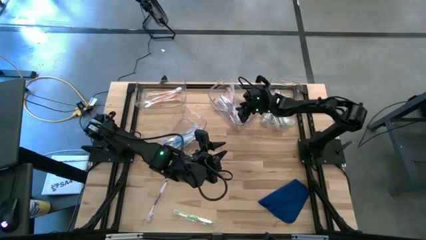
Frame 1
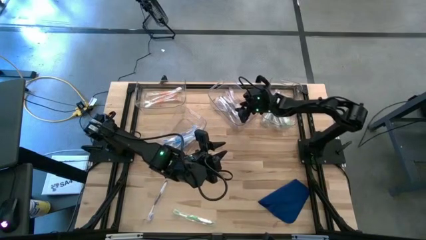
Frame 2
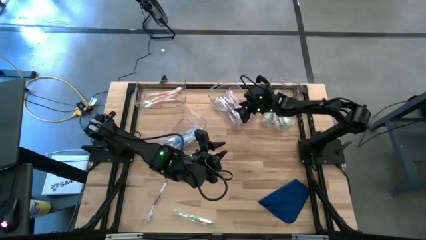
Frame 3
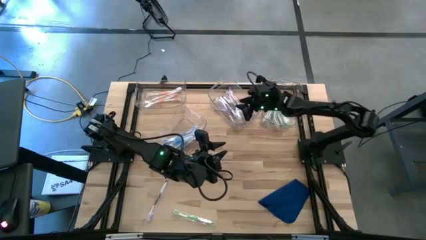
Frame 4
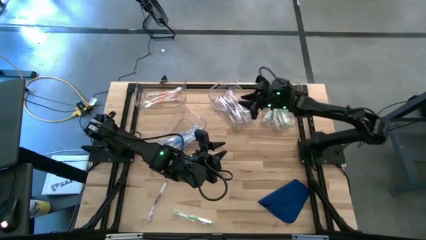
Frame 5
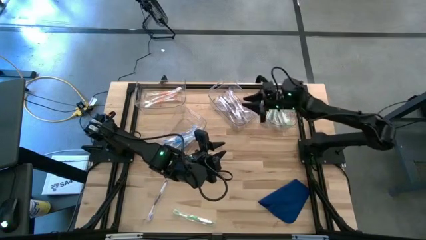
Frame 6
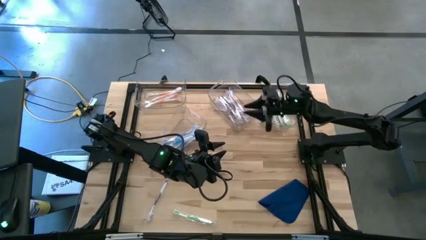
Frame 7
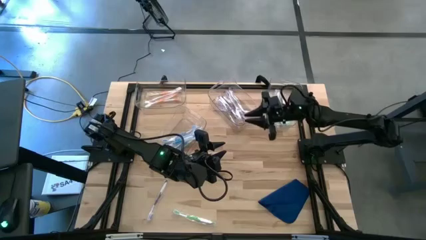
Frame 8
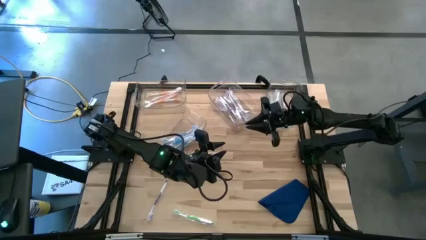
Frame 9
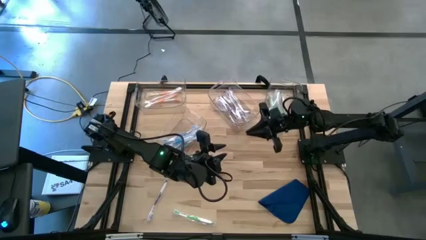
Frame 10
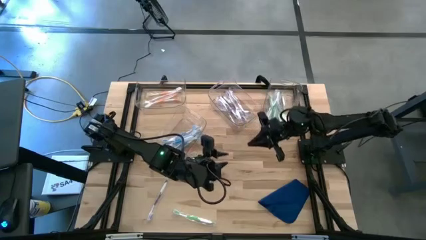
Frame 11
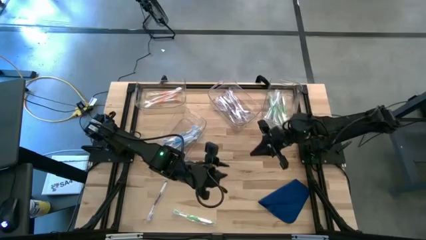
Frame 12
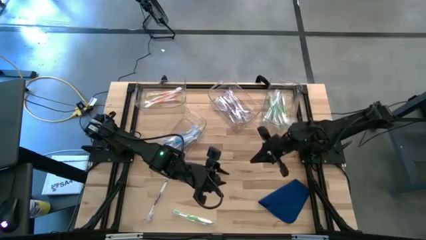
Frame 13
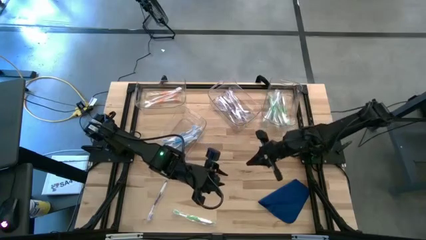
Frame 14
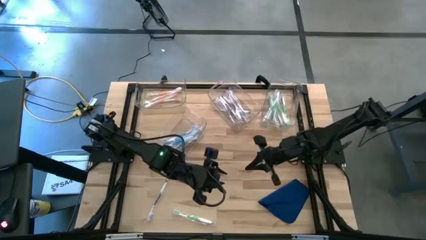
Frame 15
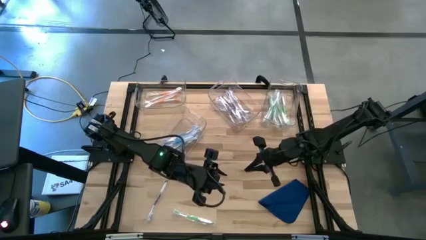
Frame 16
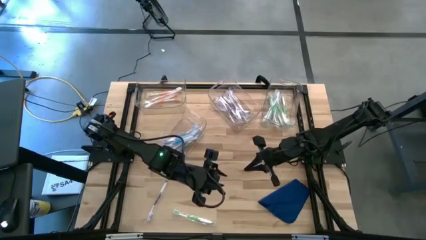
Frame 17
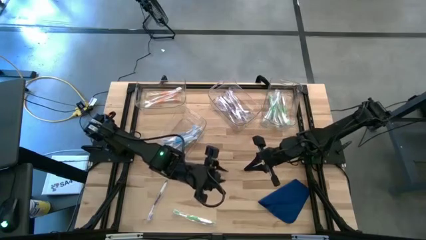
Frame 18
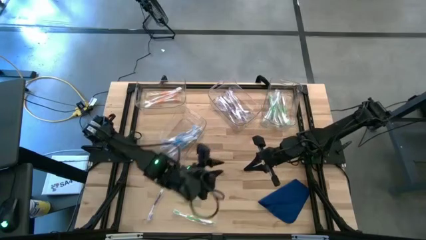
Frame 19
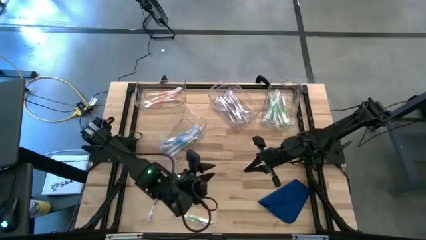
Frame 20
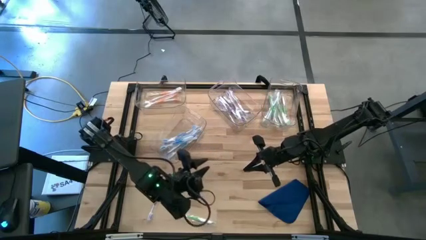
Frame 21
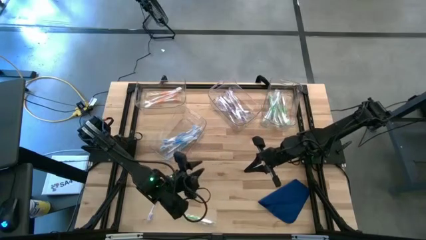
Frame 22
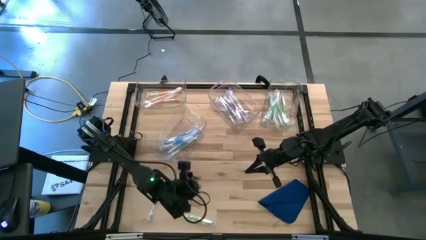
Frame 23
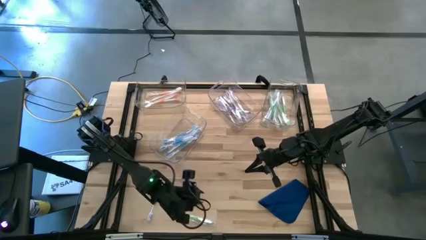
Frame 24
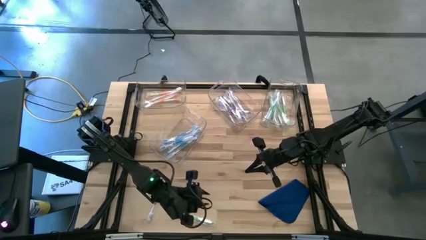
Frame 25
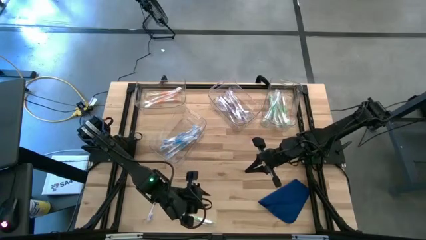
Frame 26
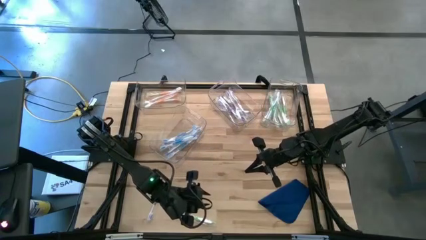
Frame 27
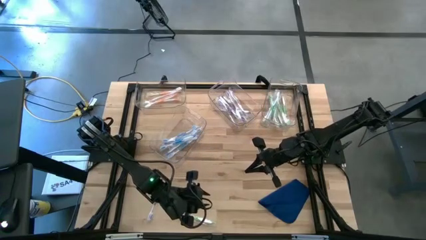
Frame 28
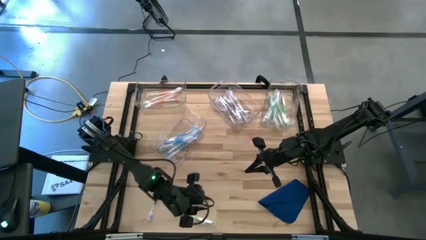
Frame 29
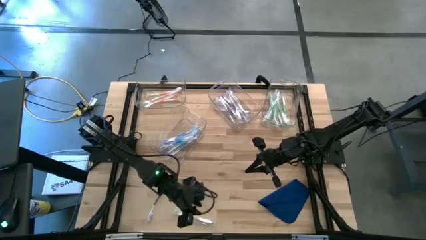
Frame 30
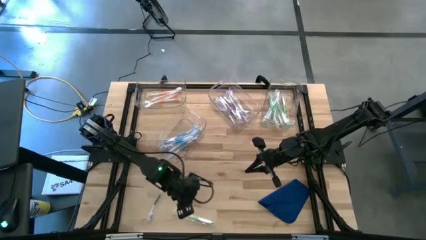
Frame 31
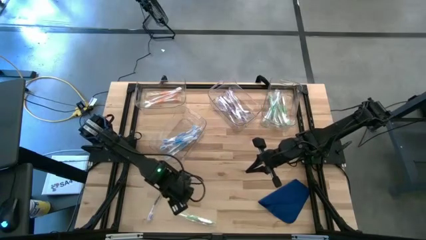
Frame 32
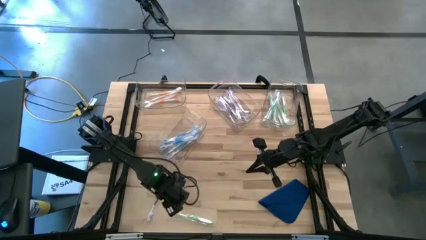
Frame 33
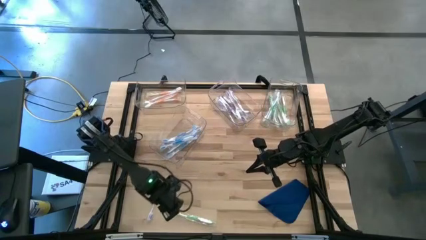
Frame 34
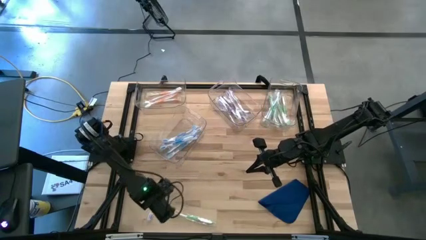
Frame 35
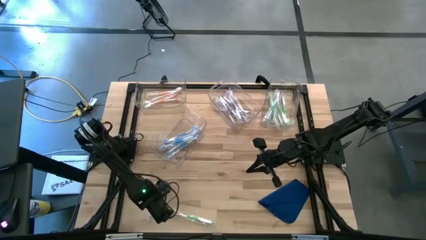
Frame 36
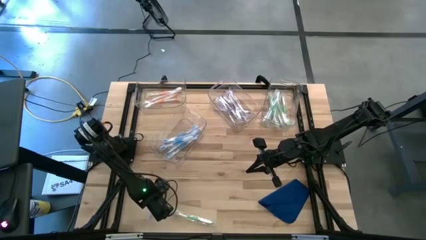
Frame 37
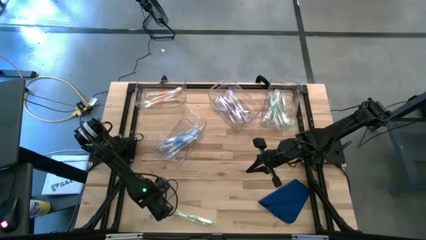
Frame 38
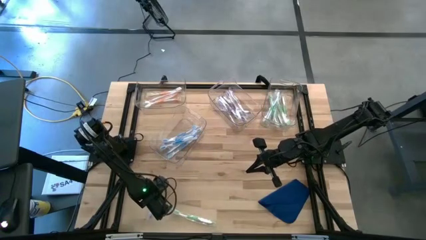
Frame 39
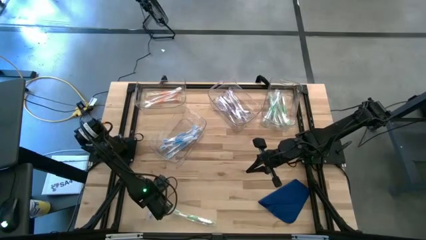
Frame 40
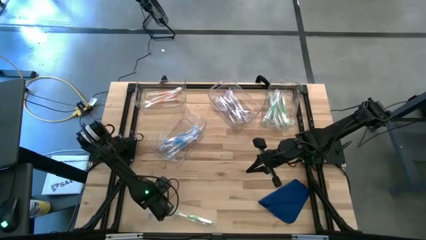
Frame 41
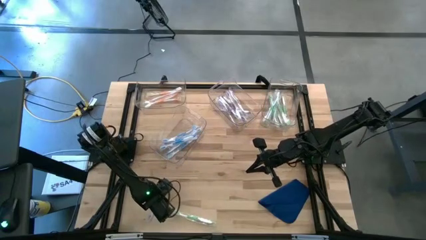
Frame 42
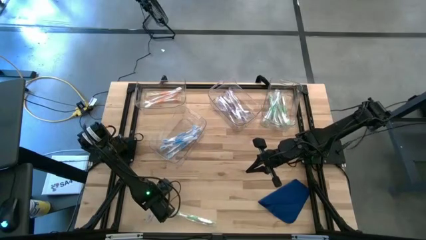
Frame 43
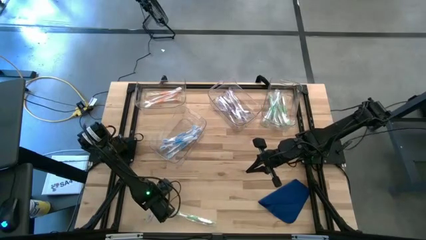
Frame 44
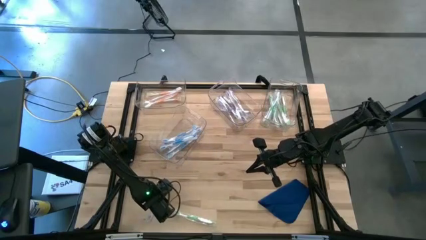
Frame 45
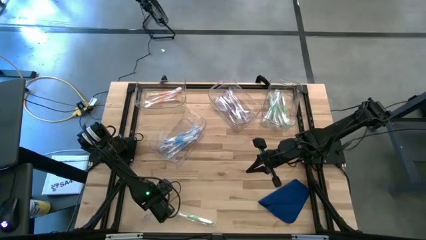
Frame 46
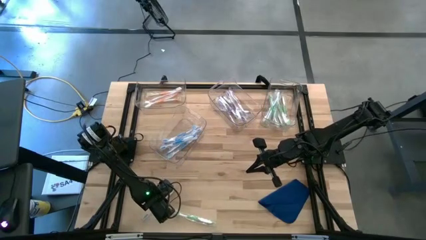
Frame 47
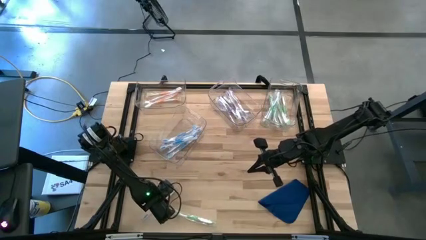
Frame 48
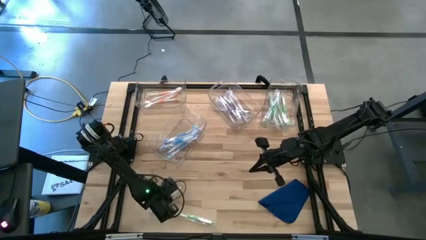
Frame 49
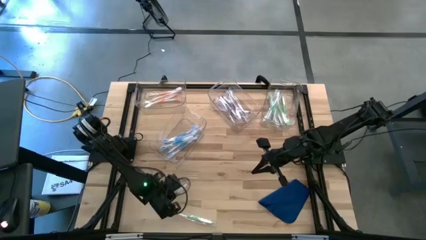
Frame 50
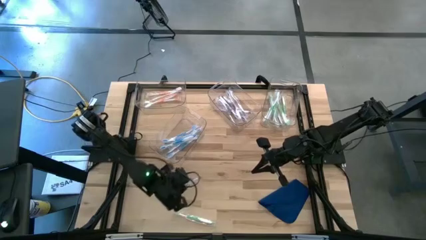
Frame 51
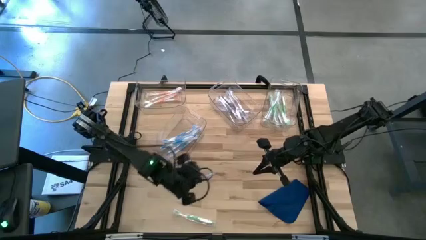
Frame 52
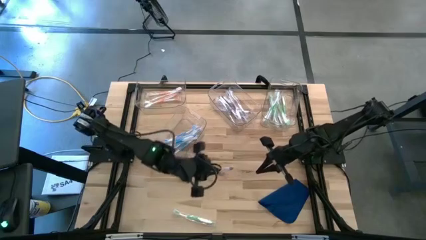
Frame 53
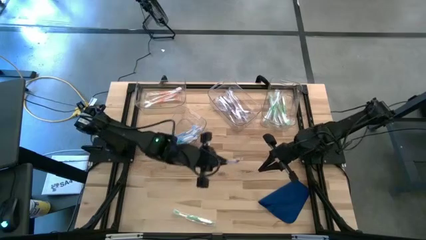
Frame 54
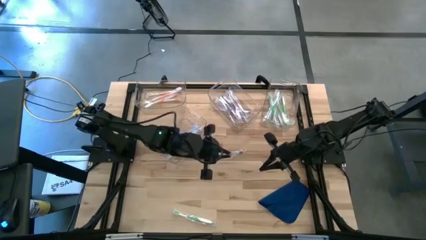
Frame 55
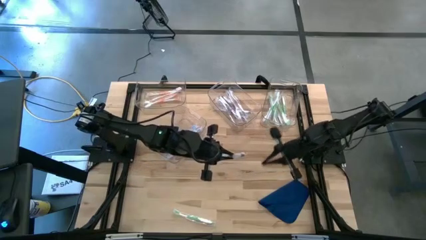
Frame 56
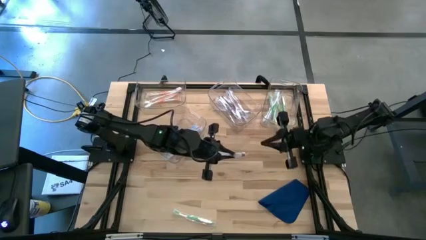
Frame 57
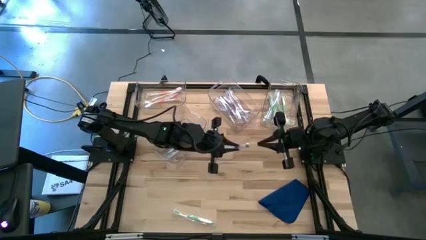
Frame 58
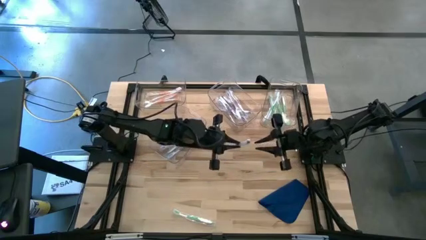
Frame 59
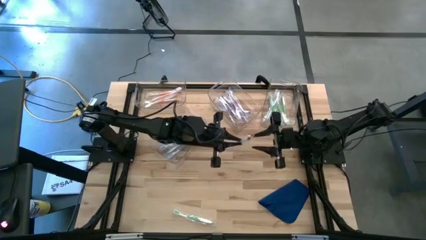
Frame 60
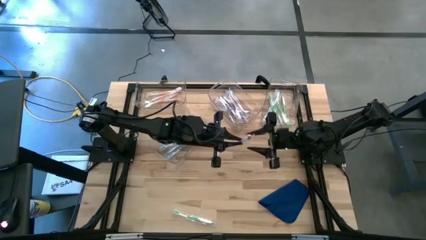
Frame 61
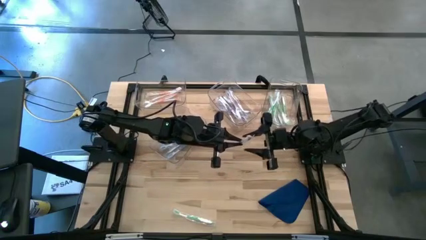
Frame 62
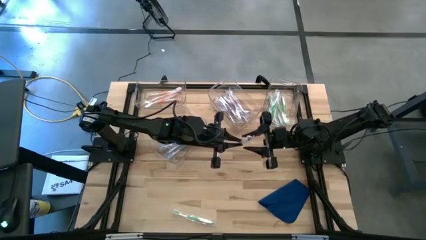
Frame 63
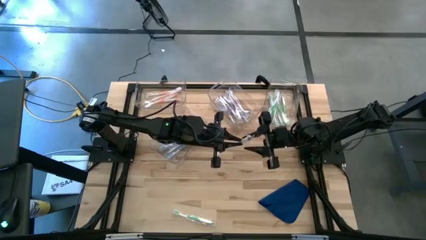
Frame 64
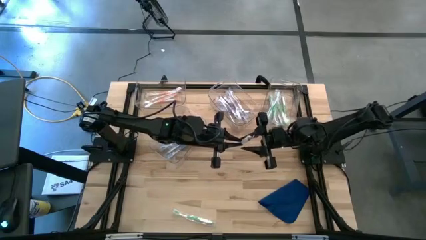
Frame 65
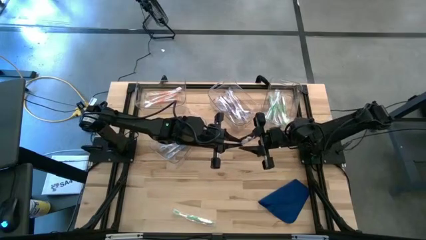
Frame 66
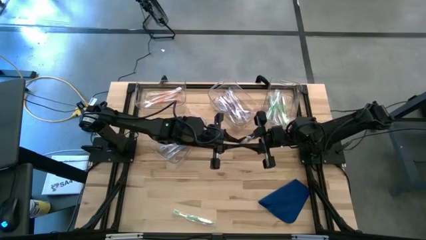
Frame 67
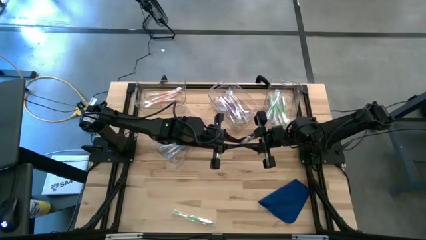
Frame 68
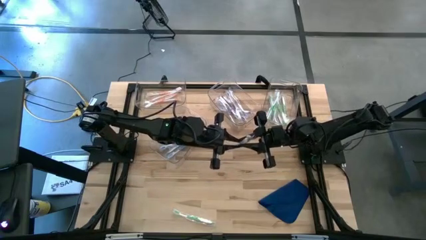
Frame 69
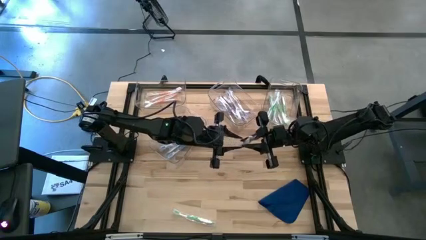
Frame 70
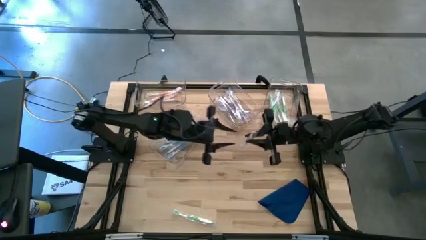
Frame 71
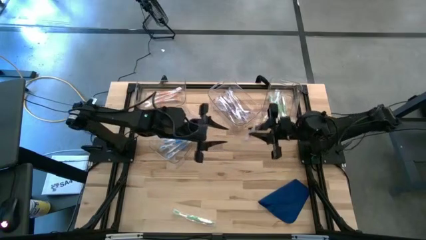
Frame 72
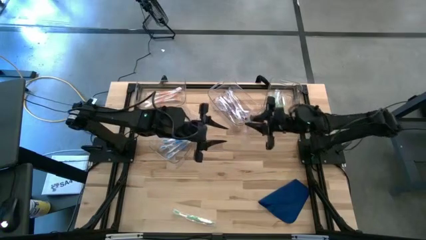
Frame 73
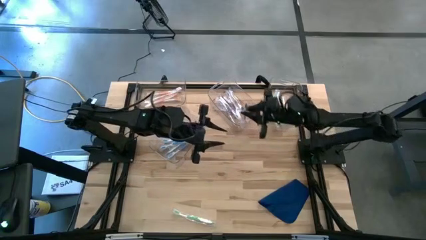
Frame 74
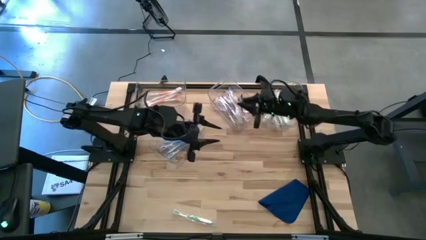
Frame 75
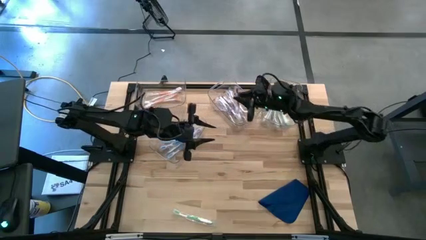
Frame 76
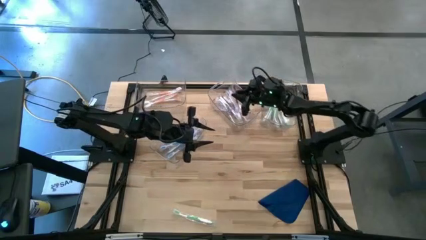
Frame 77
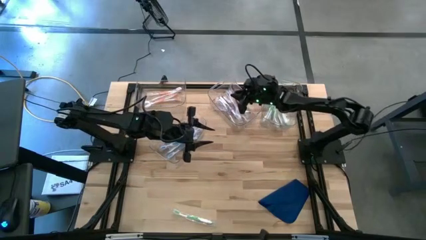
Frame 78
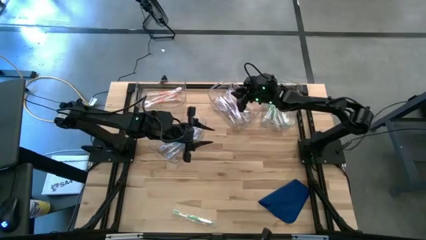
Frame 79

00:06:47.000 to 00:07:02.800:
Task: Pick & Place Toothbrushes
Put the purple toothbrush into the top center transparent bin
